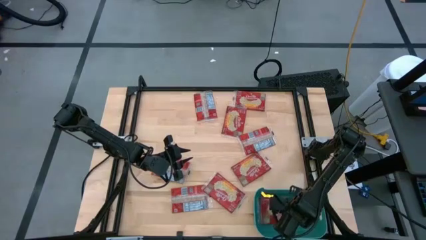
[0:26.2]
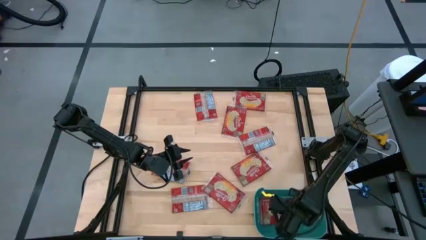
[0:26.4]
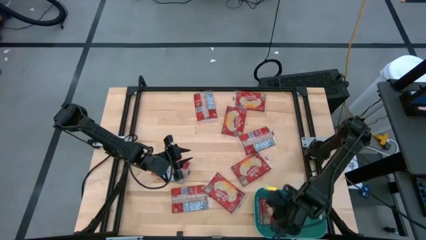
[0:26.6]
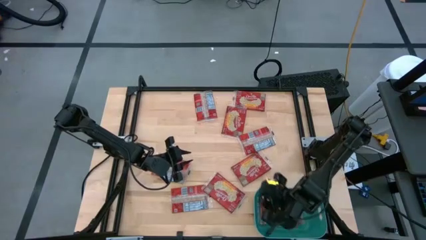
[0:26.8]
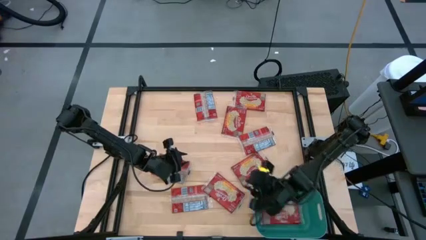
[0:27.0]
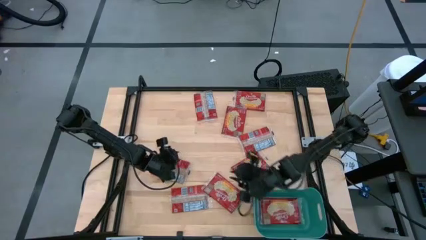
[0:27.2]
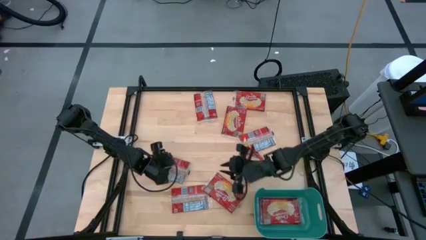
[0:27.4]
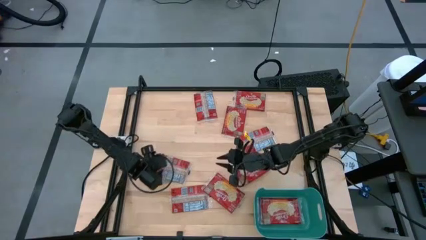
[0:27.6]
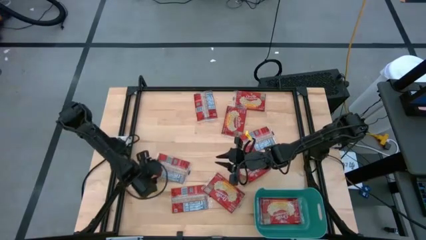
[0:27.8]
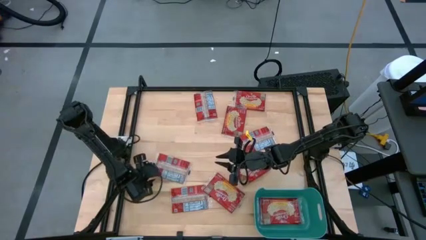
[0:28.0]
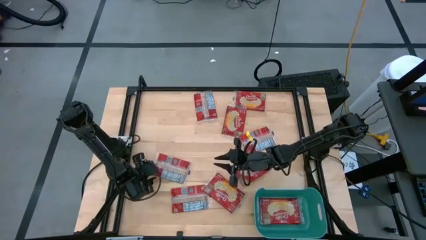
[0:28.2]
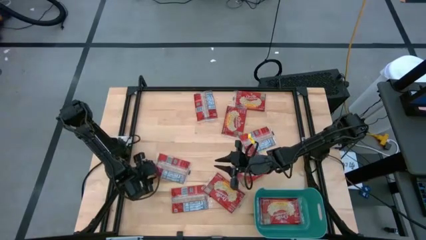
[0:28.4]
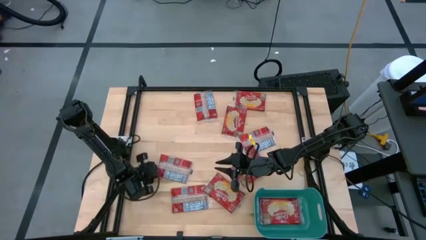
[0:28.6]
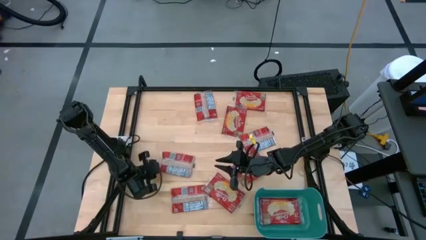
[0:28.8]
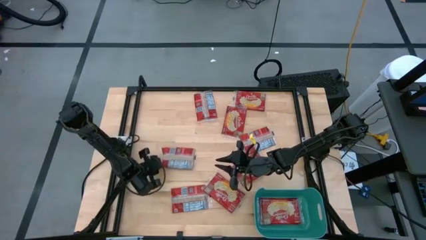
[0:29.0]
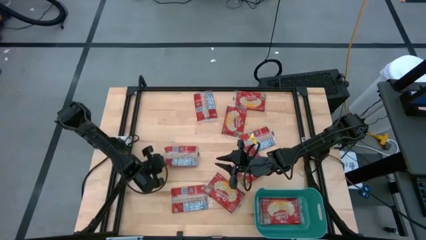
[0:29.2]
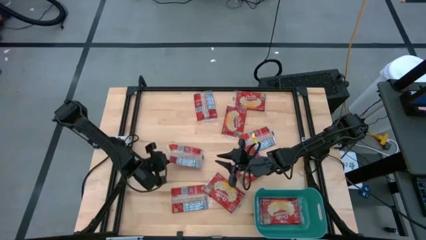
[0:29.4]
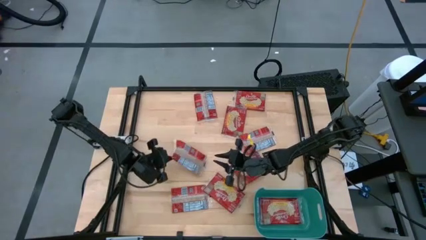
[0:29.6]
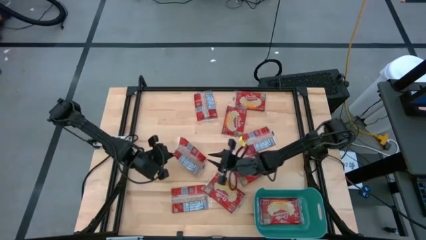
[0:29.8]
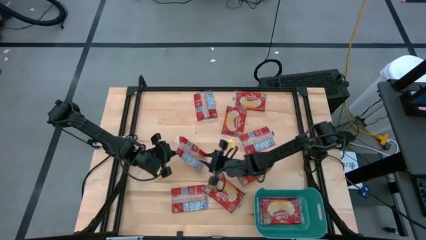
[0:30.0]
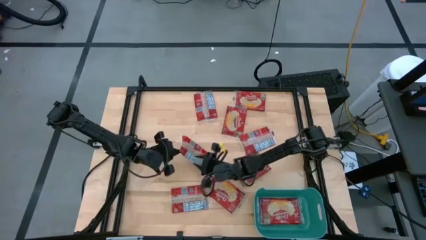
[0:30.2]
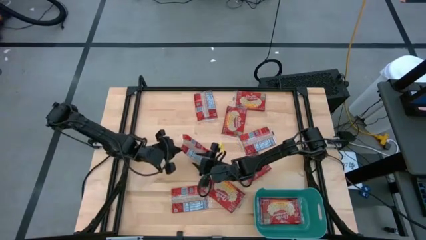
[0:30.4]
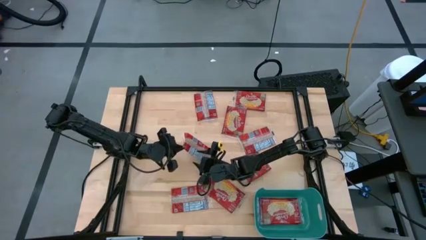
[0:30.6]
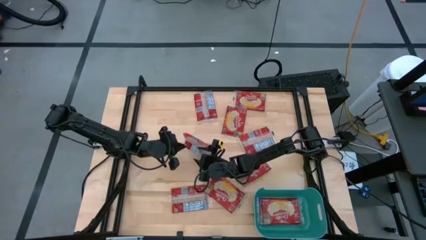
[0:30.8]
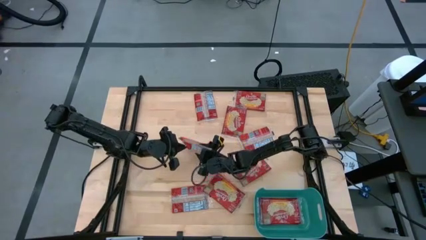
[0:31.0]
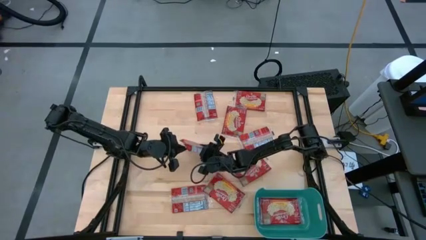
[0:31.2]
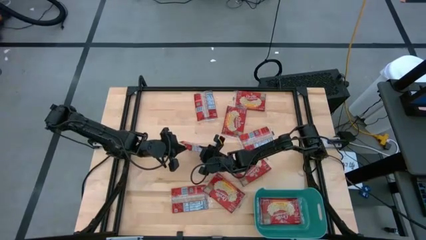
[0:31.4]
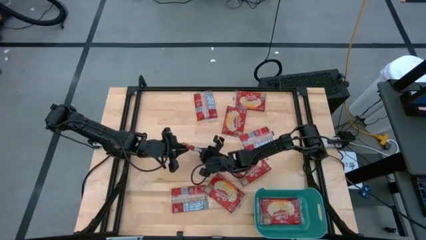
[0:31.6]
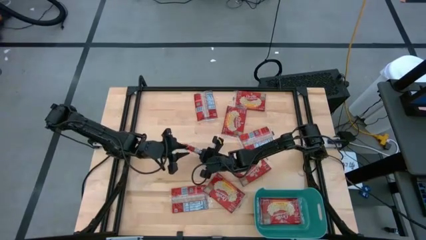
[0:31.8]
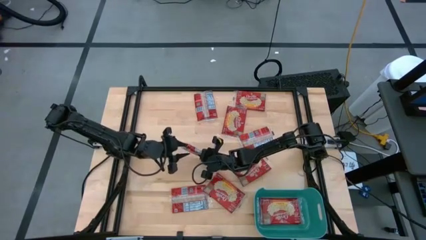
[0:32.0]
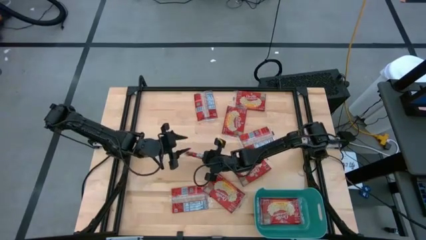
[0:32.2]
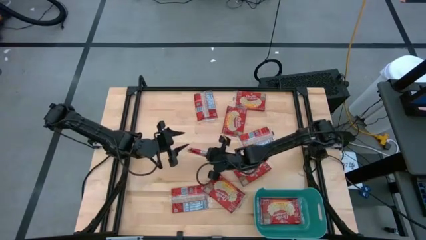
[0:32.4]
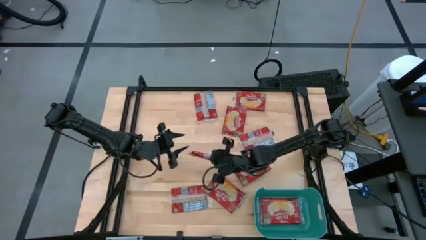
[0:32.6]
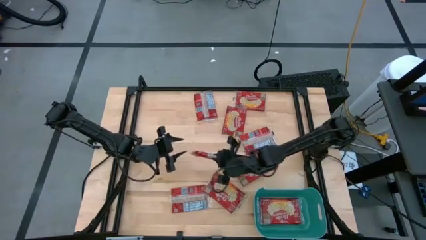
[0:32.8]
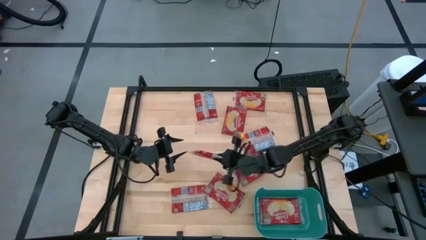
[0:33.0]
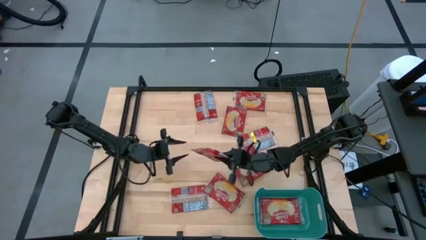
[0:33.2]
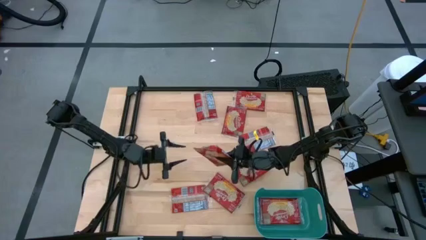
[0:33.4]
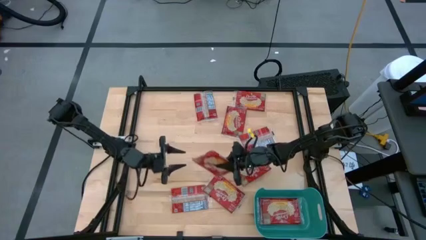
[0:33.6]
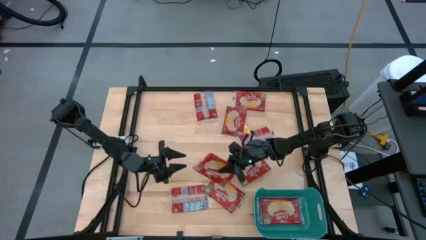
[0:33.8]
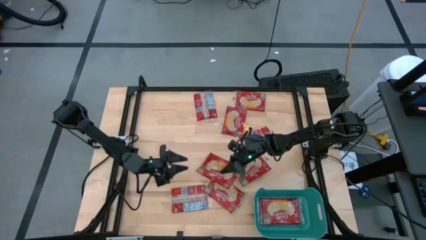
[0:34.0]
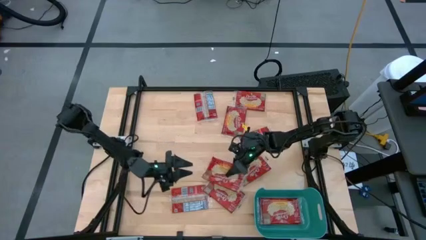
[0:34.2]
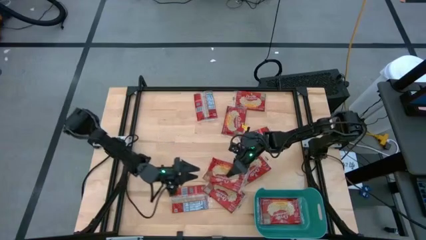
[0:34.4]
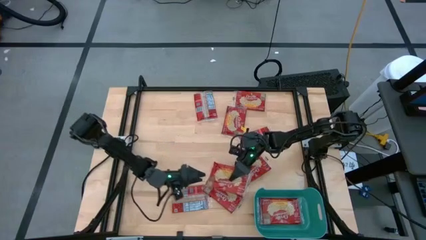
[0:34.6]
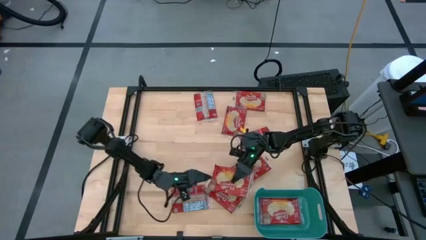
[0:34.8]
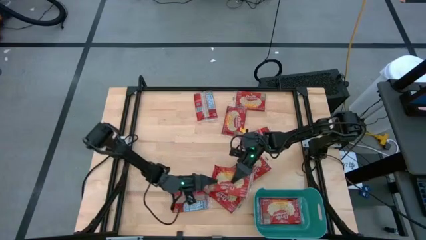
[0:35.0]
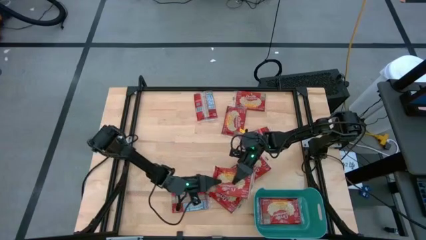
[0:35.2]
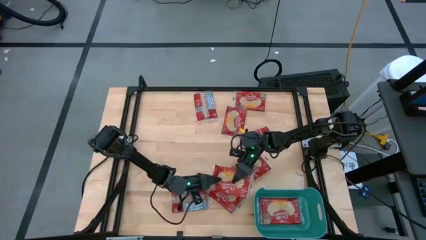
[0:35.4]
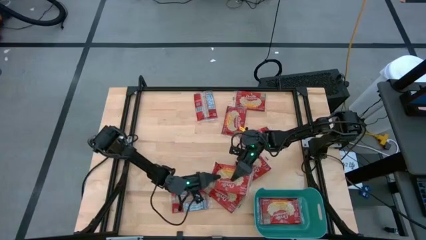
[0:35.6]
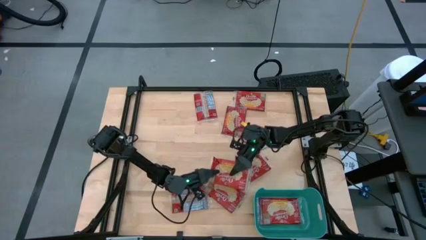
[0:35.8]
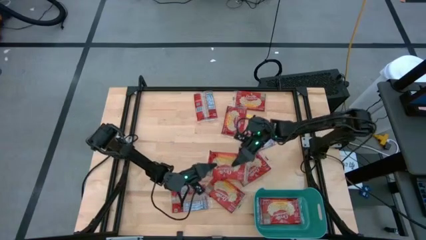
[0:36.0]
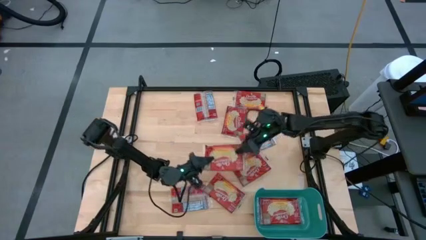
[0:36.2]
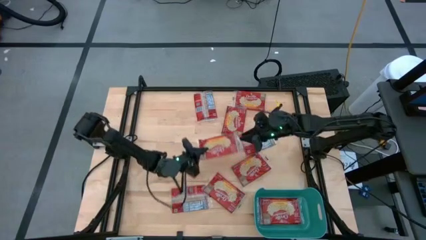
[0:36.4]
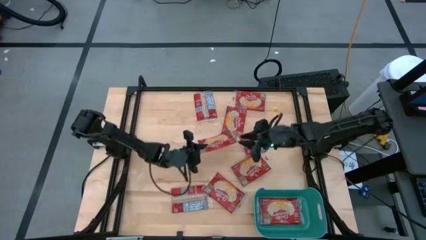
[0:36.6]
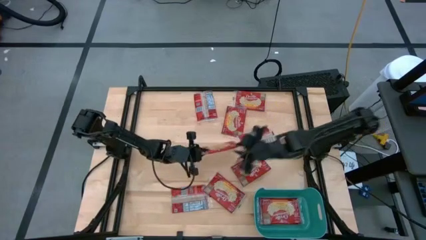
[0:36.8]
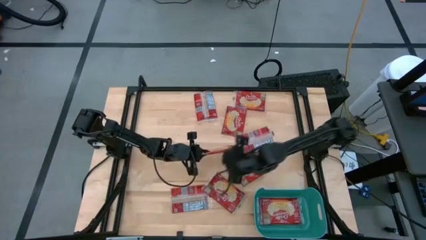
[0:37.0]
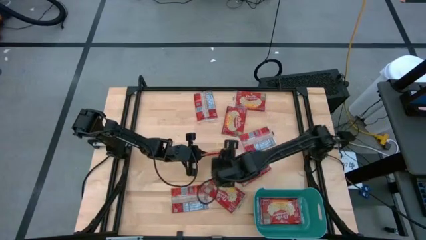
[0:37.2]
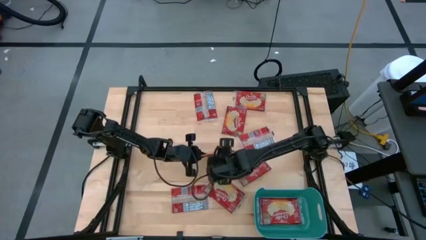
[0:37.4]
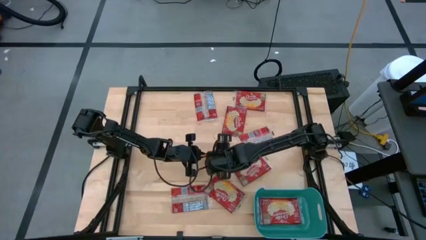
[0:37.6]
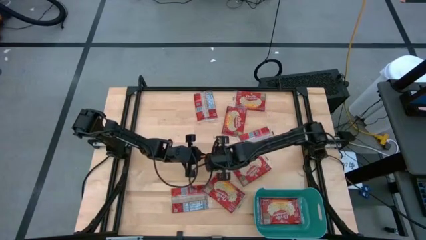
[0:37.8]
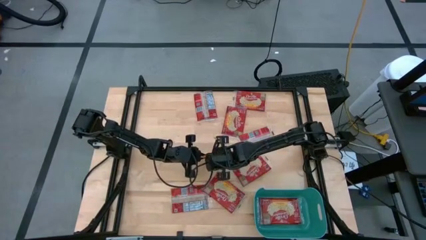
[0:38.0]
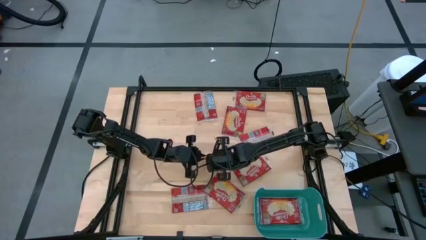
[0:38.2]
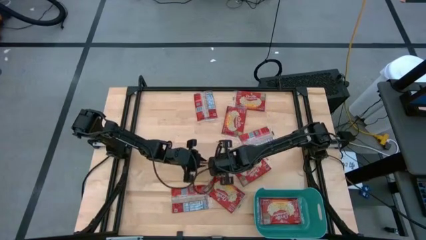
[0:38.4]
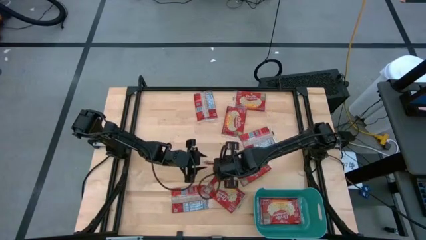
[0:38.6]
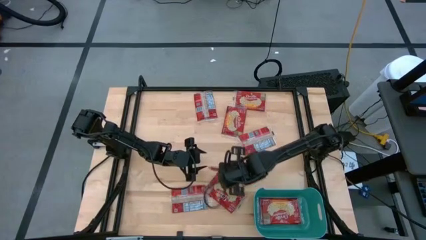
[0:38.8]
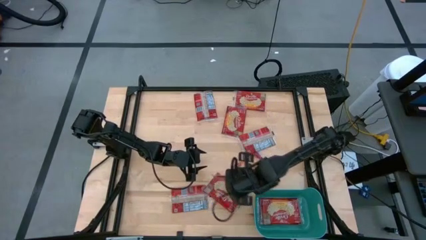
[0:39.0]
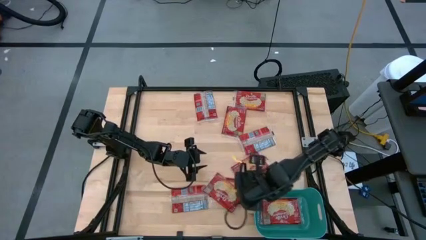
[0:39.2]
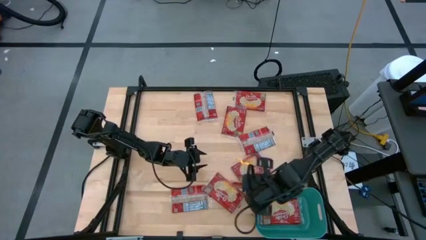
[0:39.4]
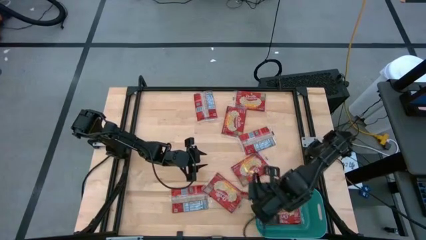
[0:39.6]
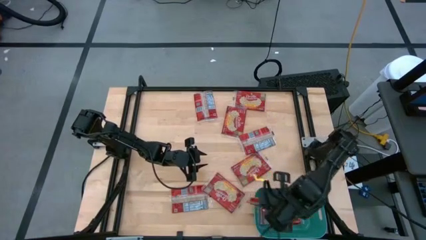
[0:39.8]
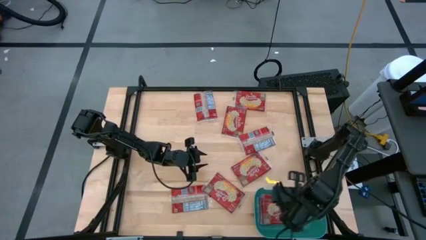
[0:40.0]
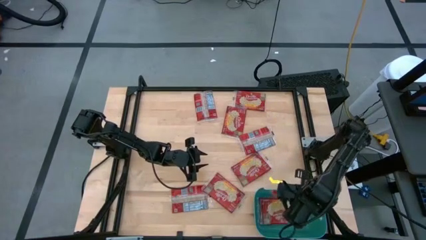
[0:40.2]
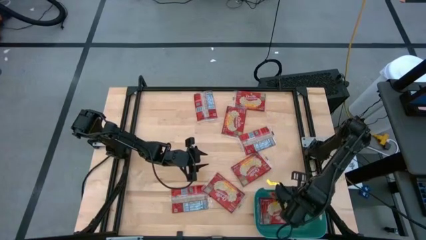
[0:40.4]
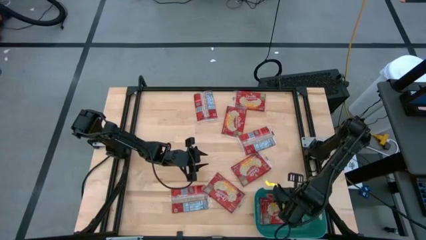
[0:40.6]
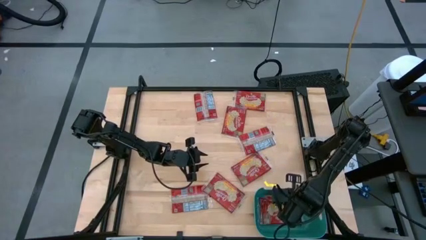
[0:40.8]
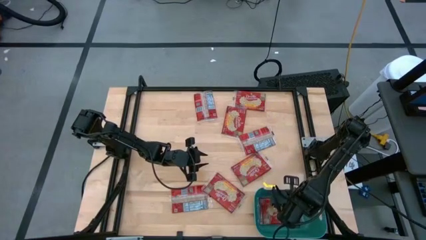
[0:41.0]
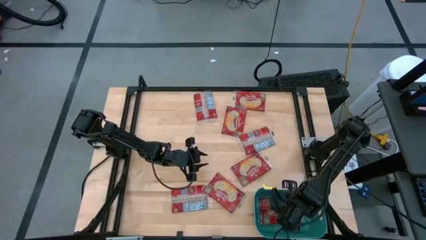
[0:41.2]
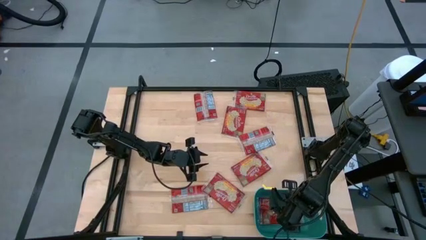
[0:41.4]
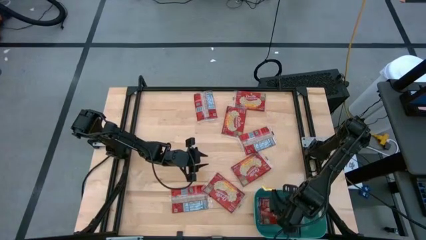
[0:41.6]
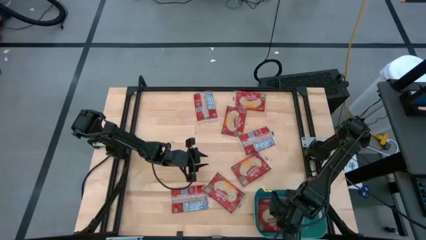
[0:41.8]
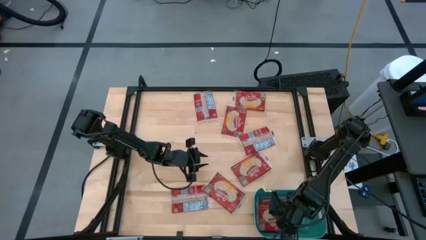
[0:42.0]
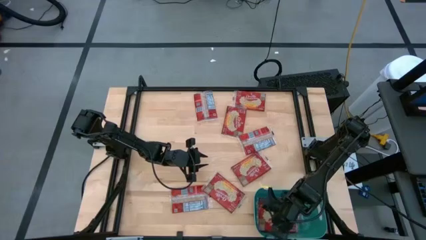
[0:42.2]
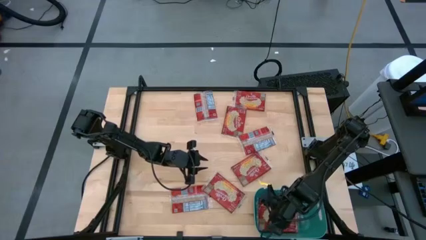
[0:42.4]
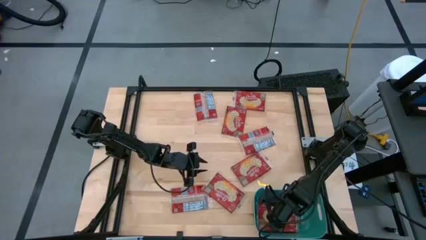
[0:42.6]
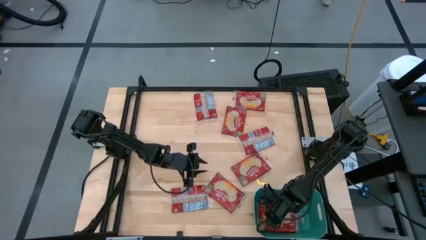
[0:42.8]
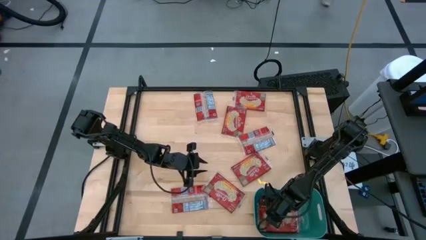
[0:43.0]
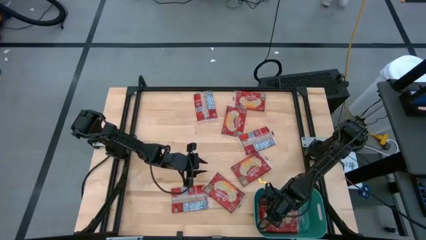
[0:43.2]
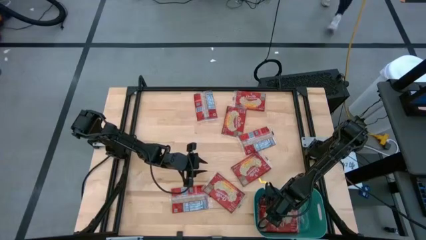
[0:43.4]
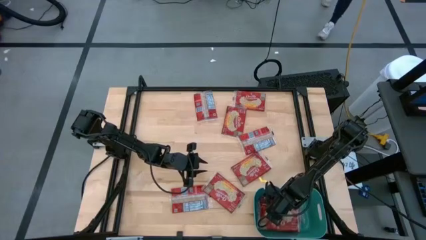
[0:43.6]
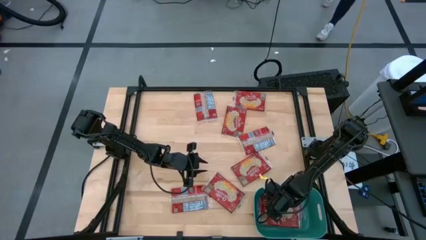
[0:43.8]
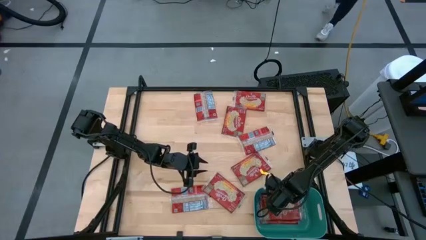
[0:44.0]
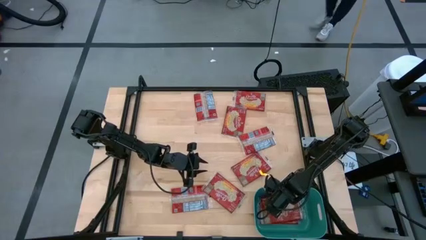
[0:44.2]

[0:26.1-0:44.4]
Task: Sort popcorn bags into baskets
Put the popcorn bag into the green bin
